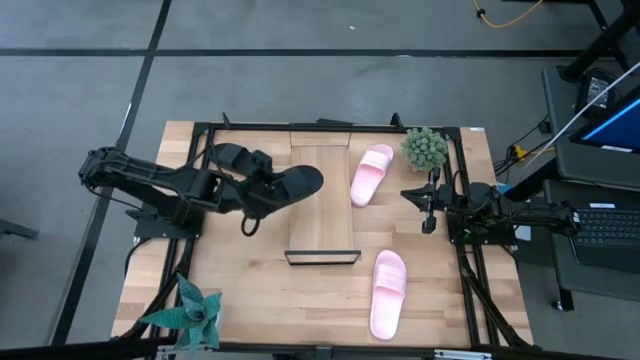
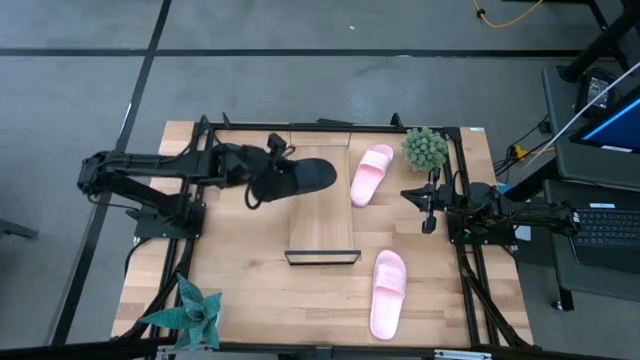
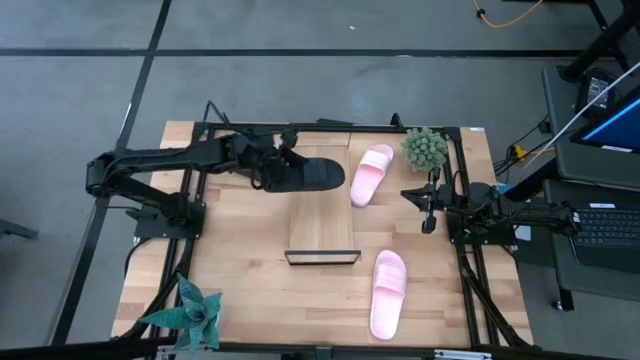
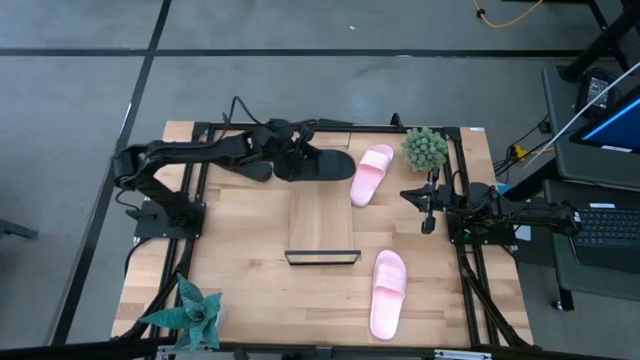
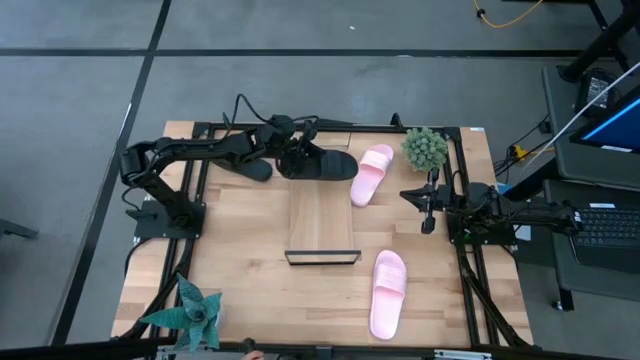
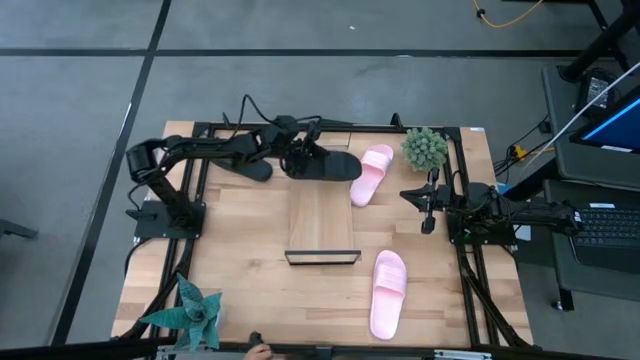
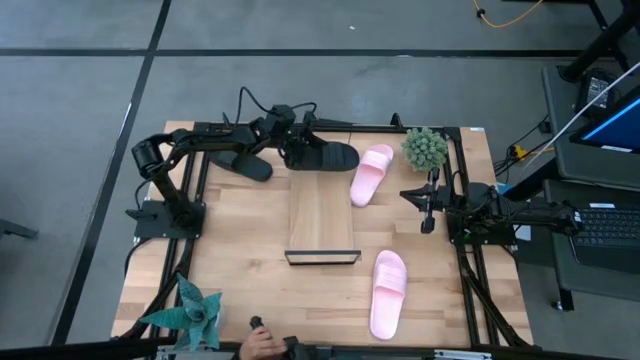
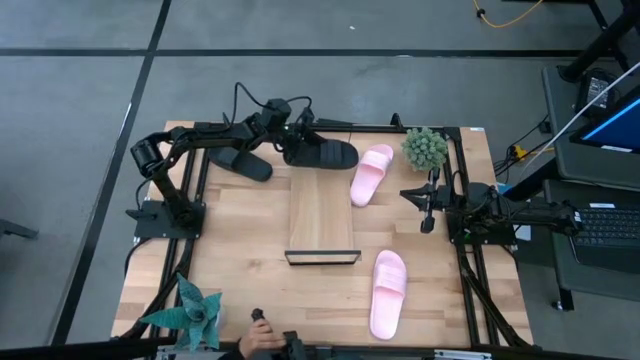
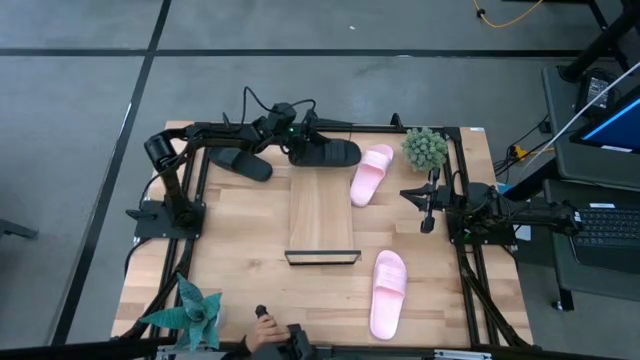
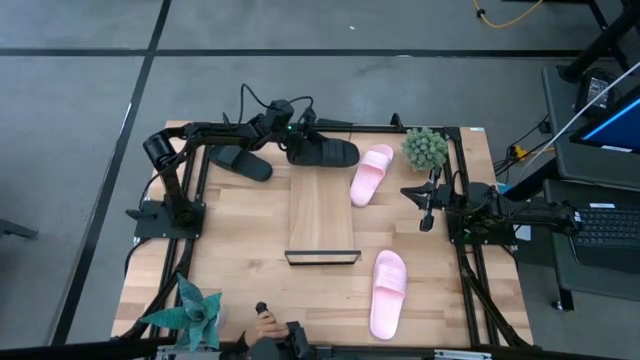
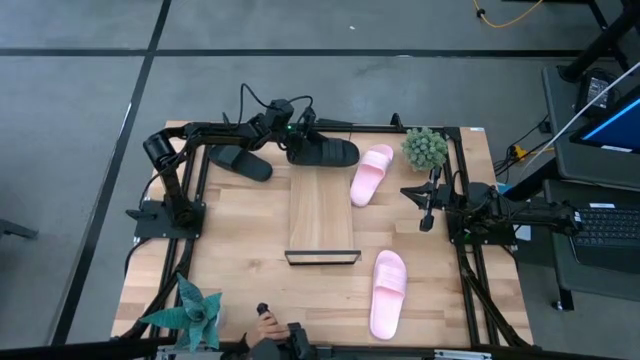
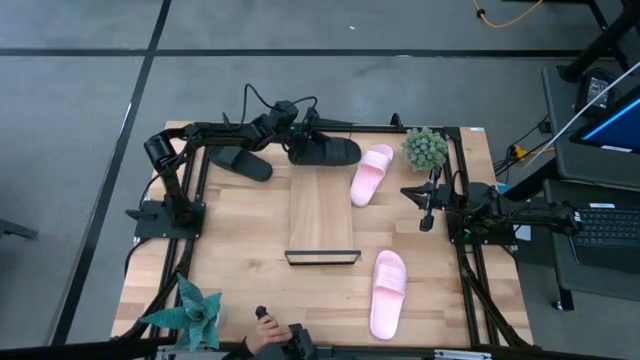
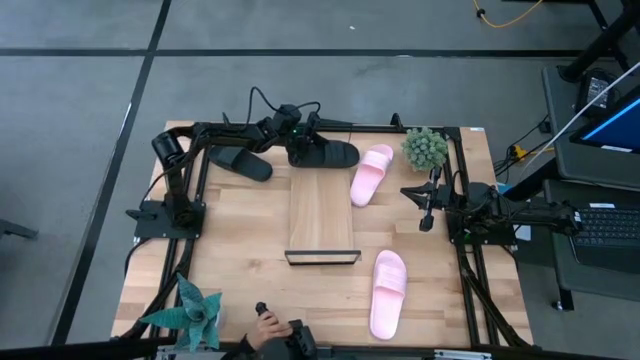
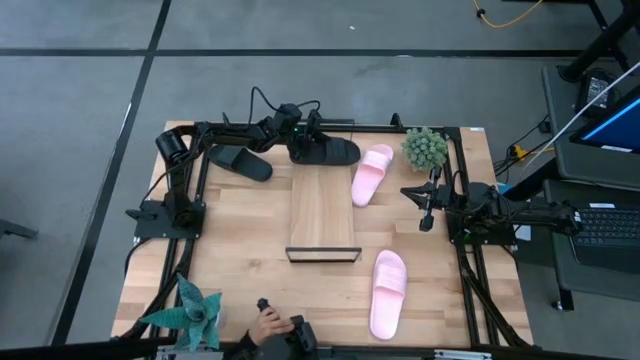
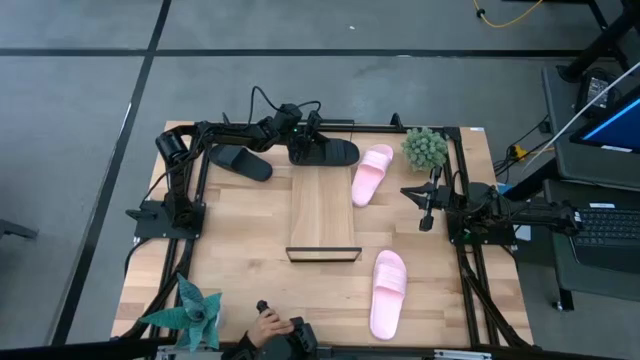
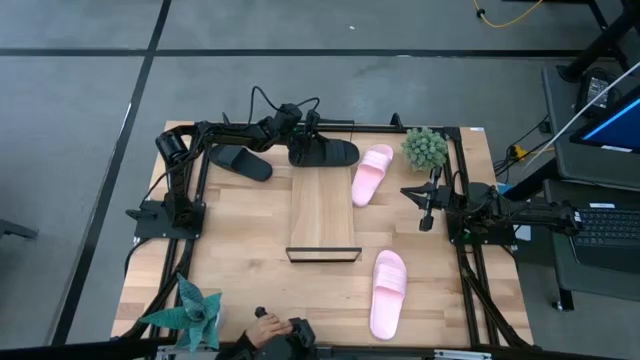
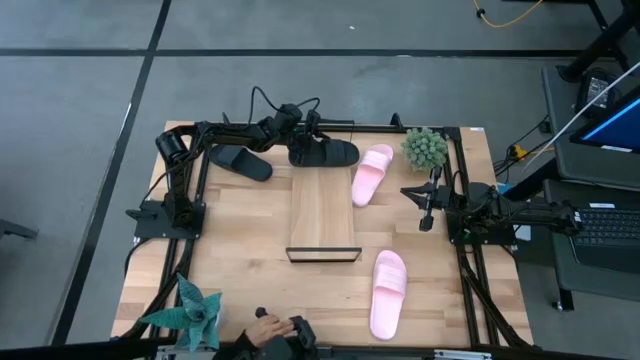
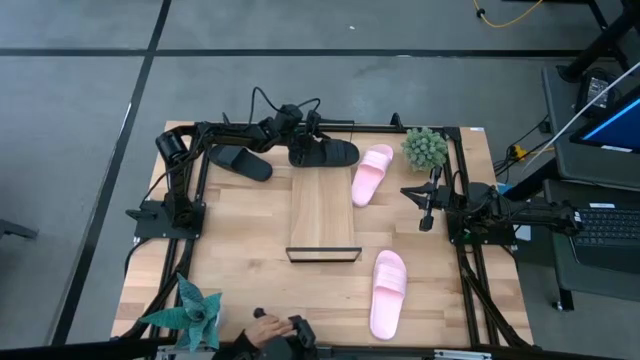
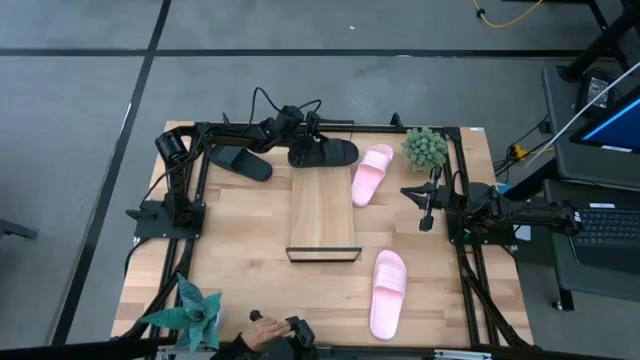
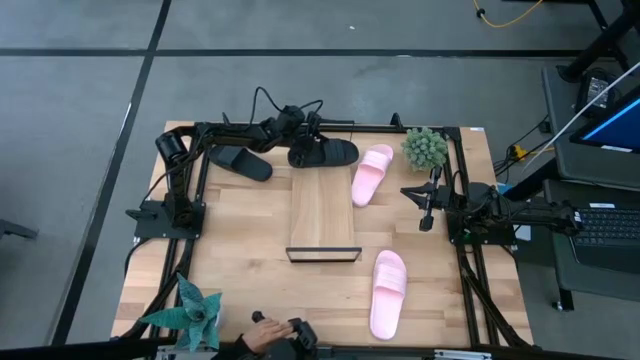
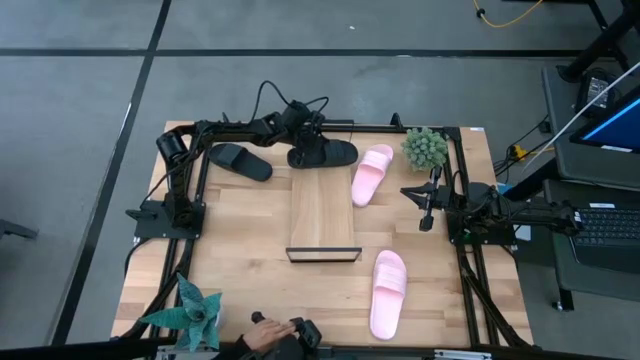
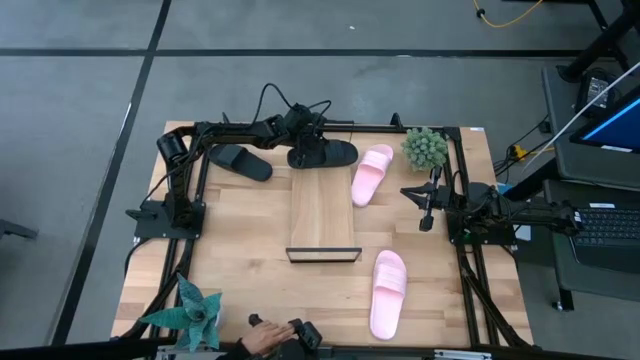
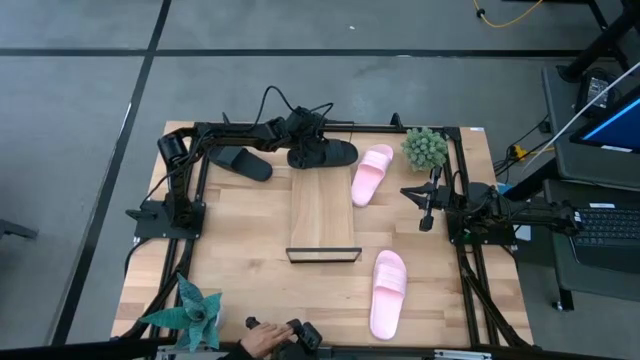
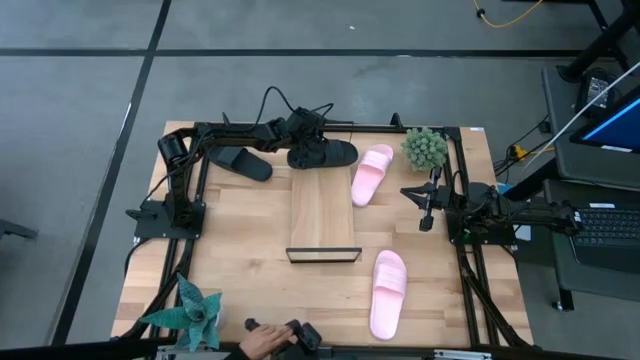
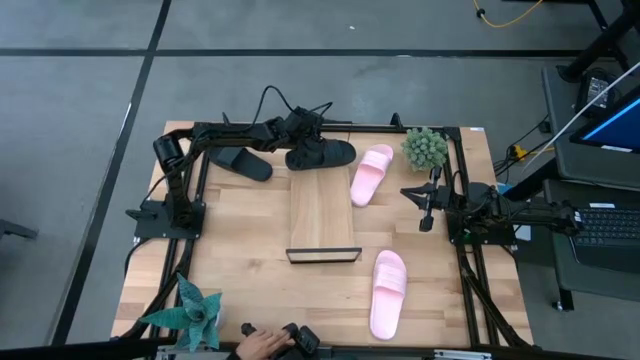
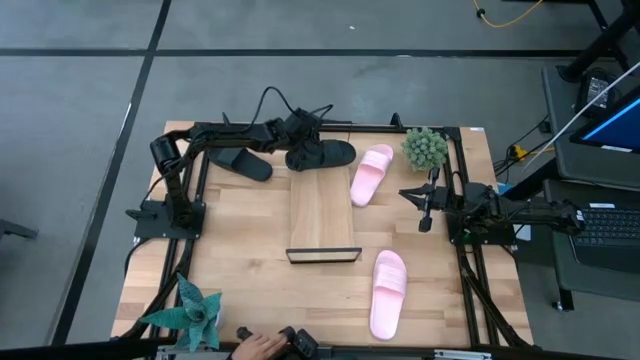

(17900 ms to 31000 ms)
Task: Pick and place slides into the shelf
Put the bottom black slide on the shelf

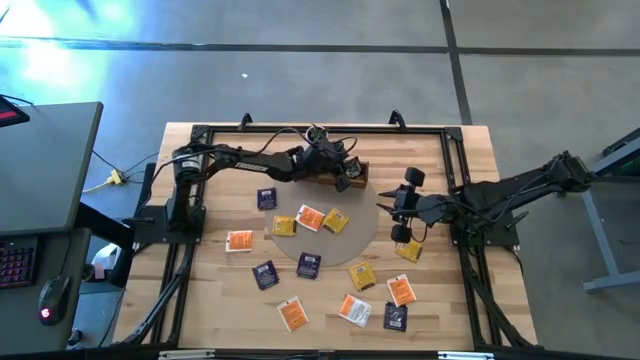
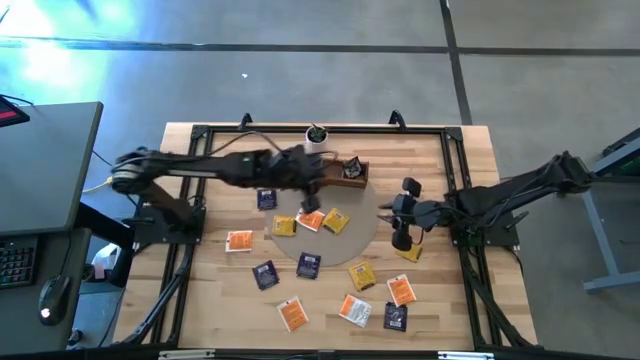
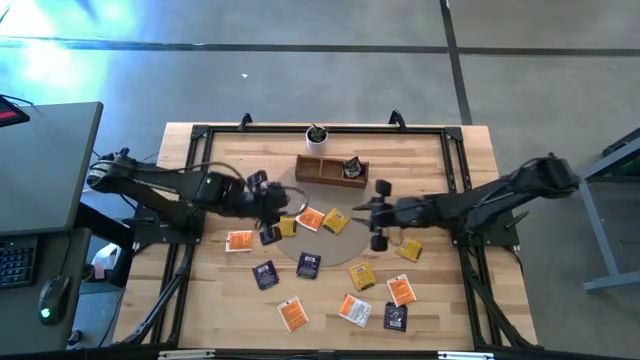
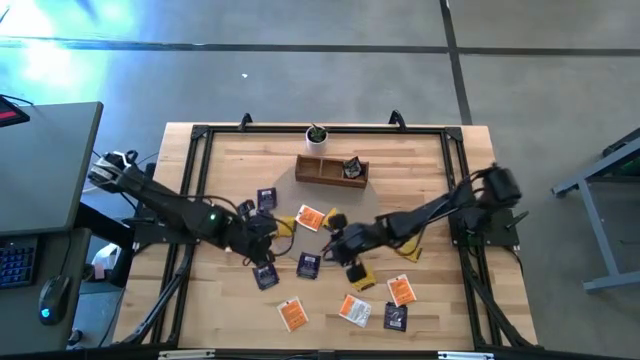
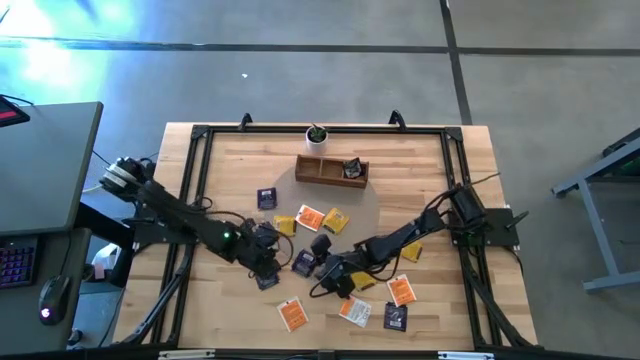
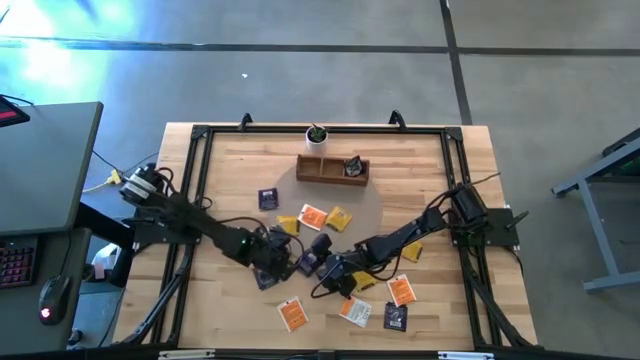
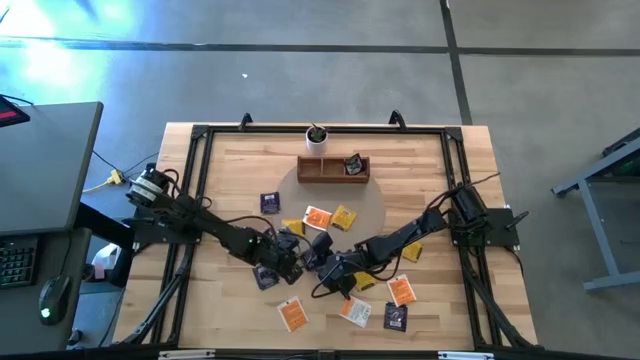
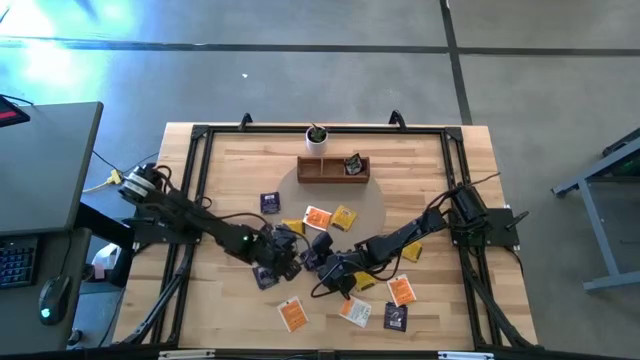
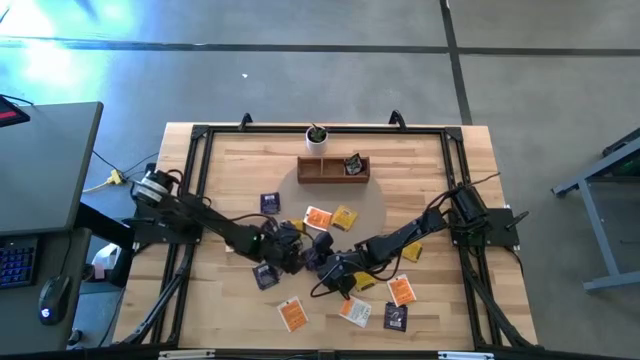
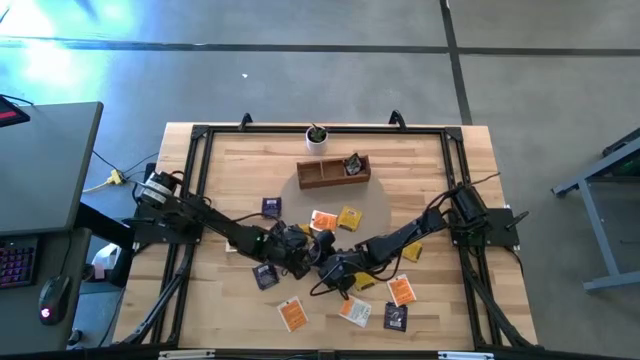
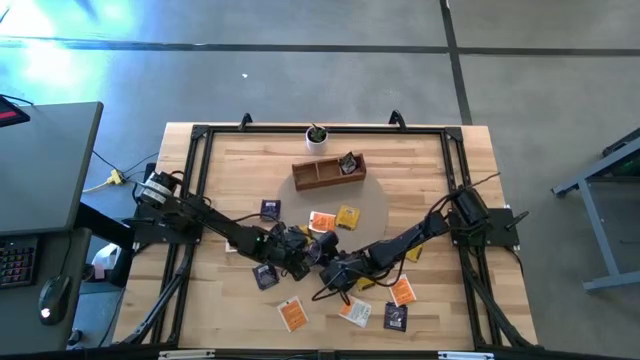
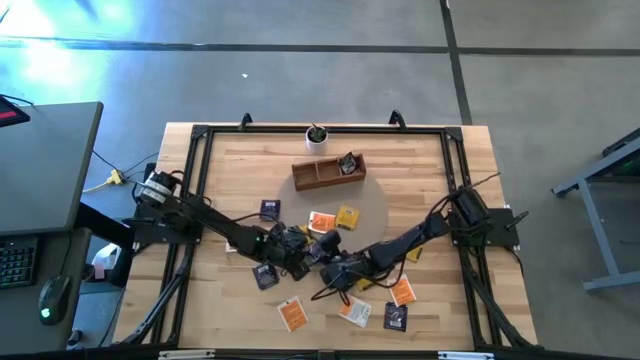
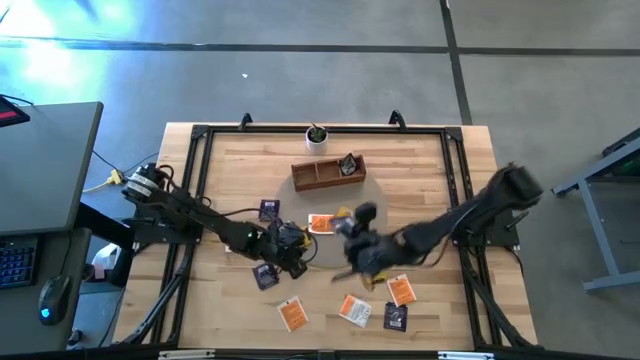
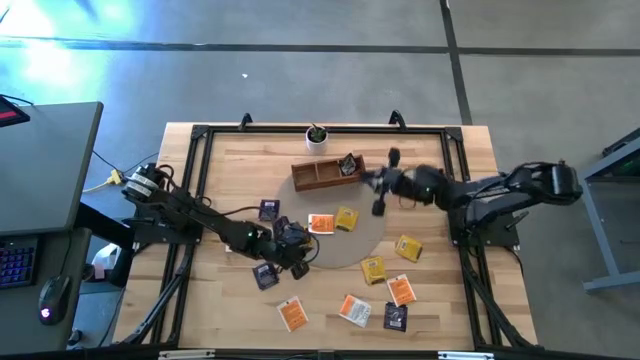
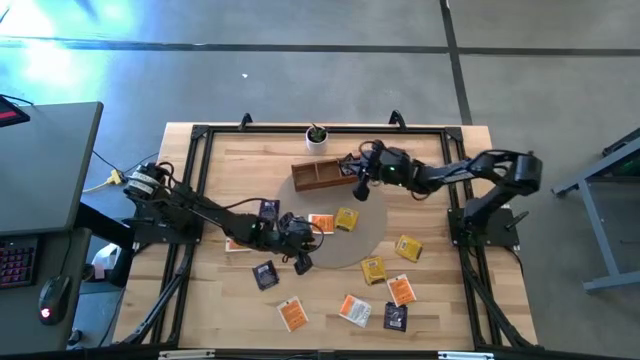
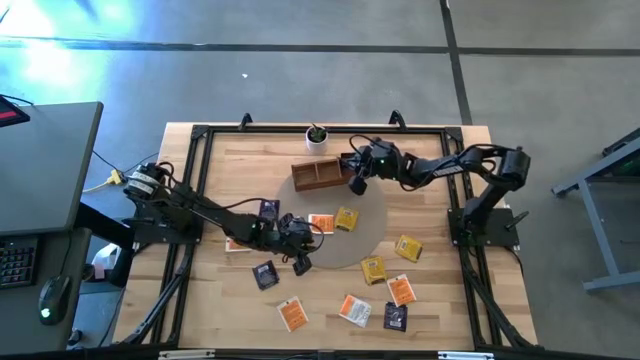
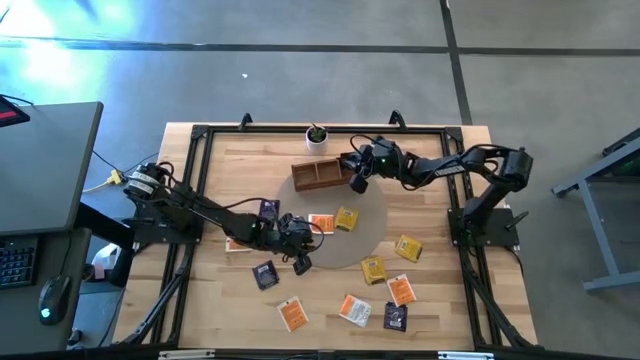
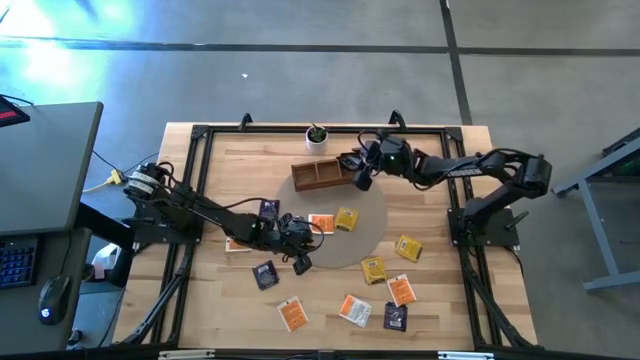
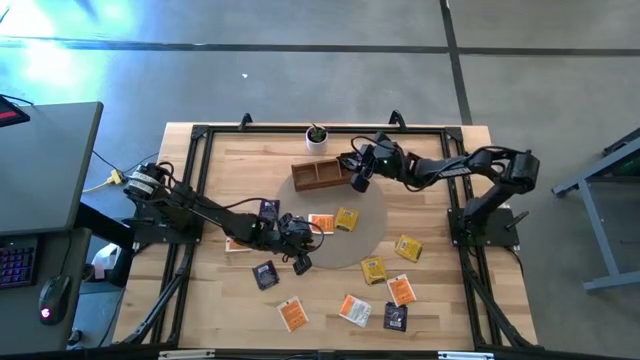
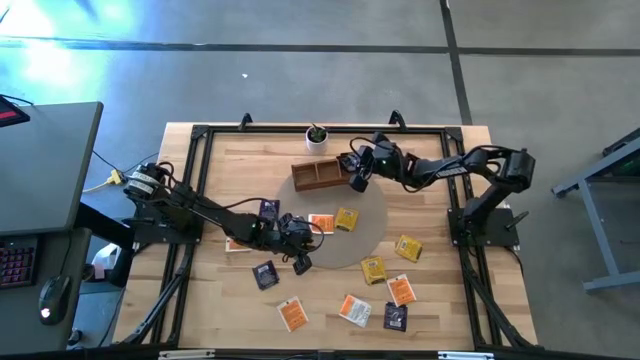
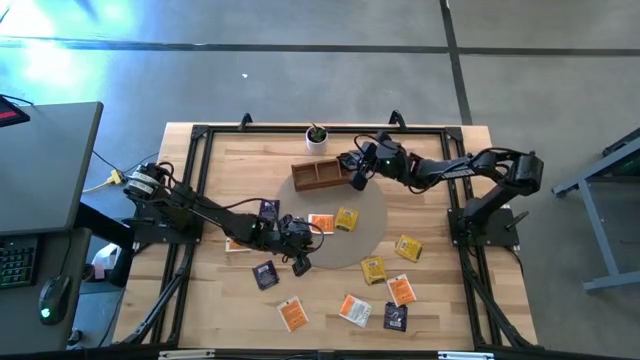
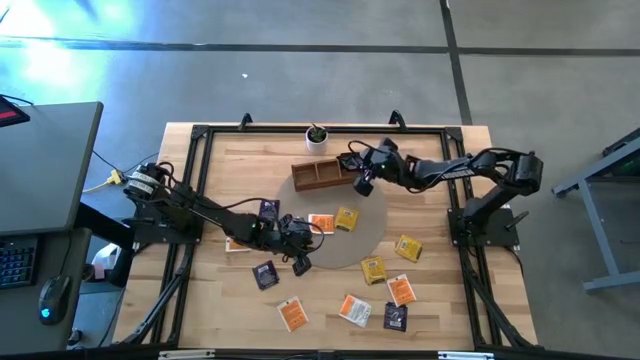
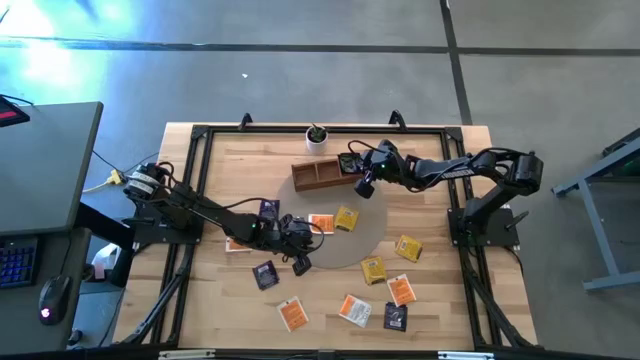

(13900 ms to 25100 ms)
Task: Pick & Place Tea
Put the purple tea bag into the right section of the wooden organizer
